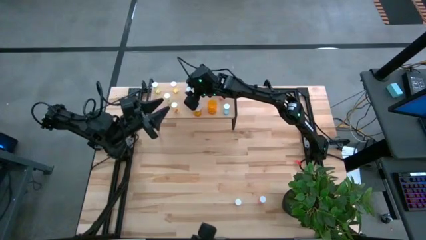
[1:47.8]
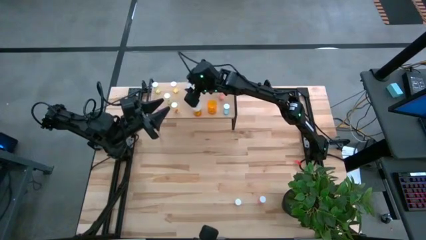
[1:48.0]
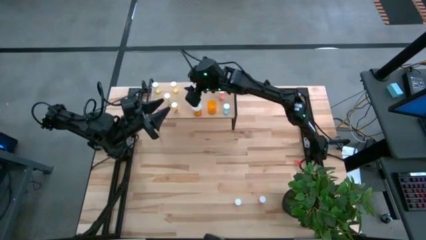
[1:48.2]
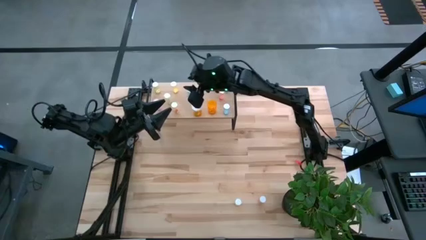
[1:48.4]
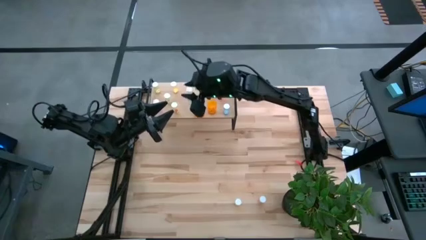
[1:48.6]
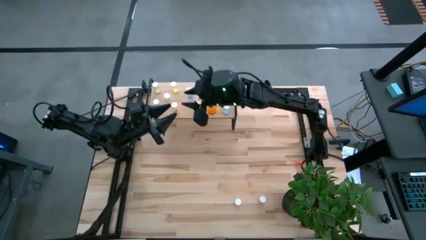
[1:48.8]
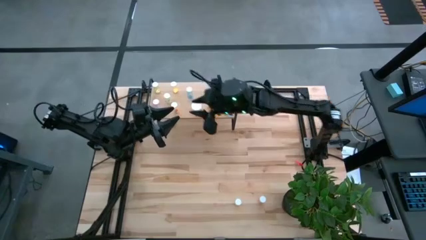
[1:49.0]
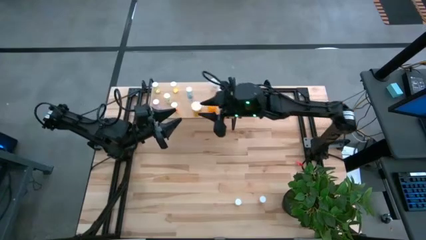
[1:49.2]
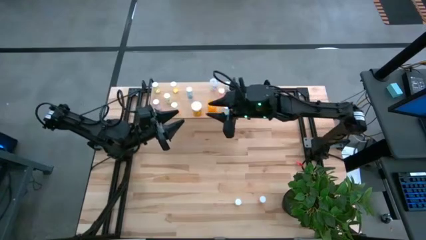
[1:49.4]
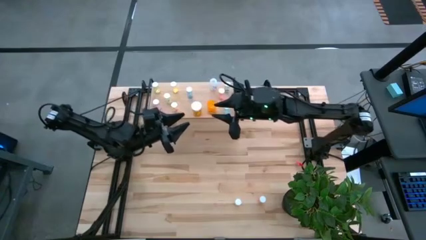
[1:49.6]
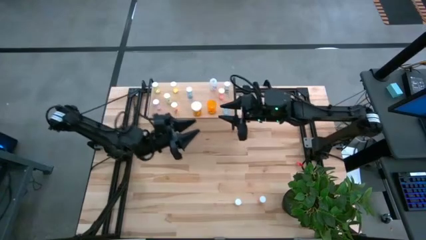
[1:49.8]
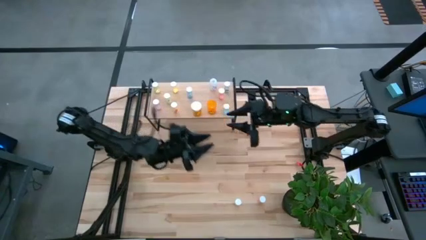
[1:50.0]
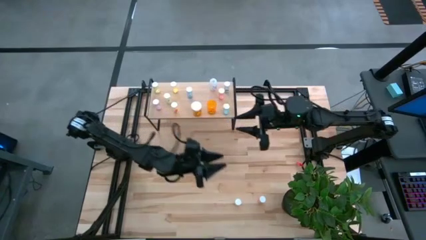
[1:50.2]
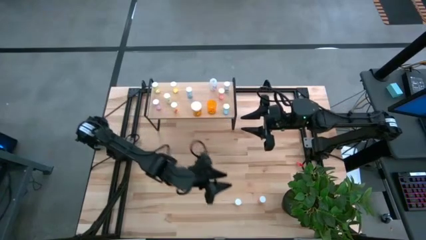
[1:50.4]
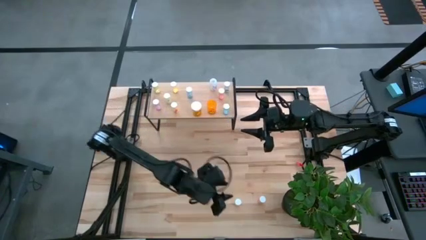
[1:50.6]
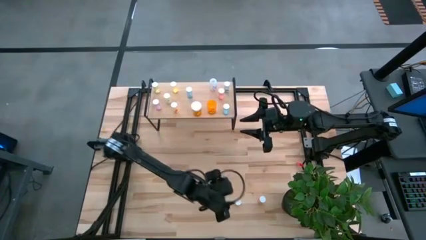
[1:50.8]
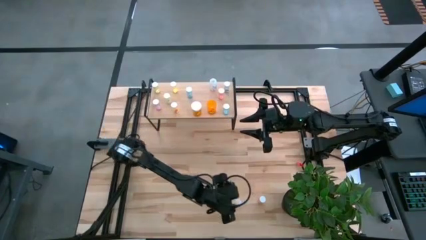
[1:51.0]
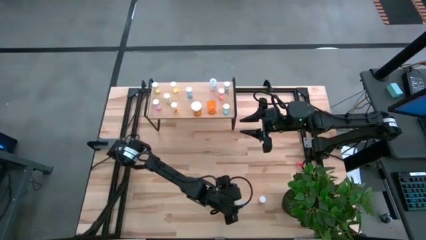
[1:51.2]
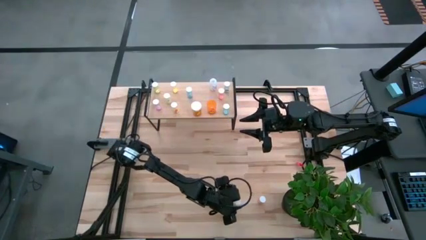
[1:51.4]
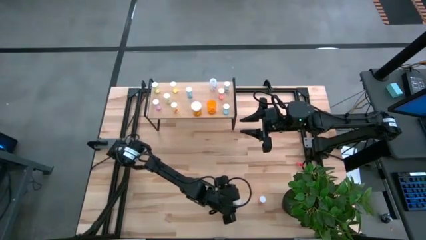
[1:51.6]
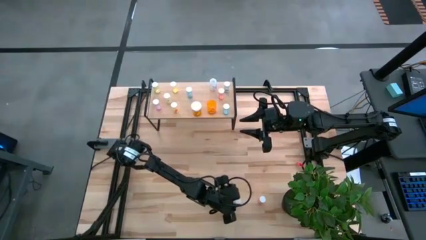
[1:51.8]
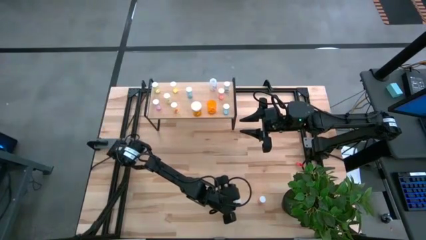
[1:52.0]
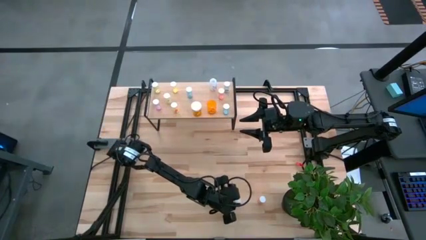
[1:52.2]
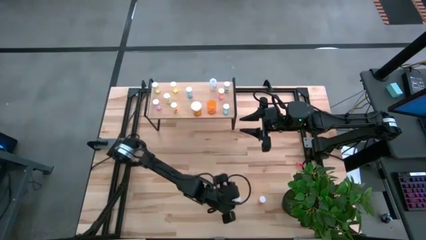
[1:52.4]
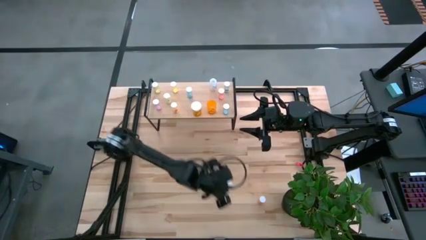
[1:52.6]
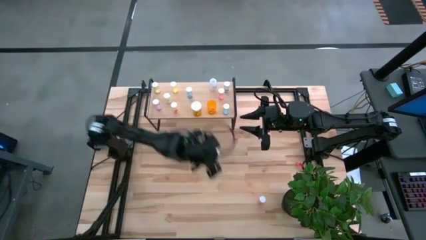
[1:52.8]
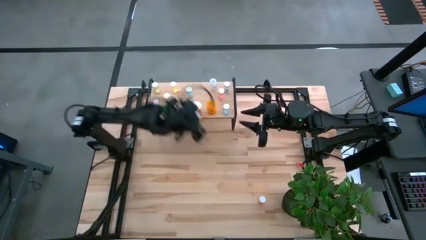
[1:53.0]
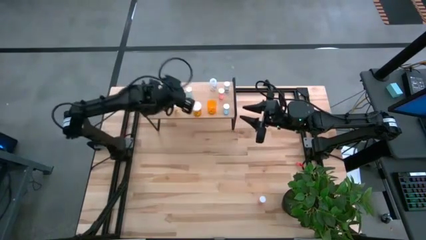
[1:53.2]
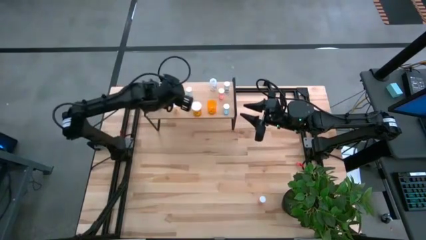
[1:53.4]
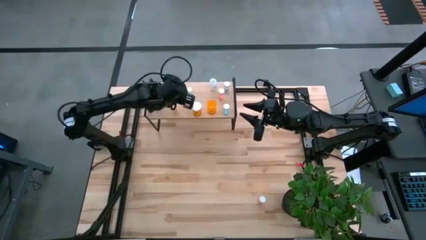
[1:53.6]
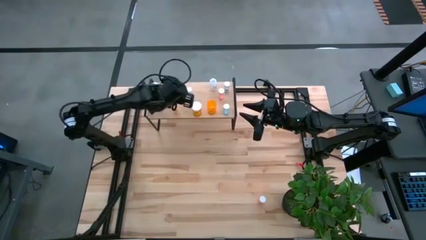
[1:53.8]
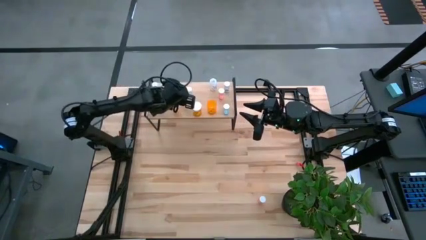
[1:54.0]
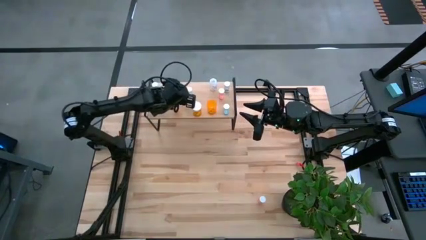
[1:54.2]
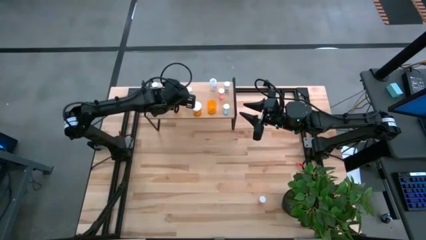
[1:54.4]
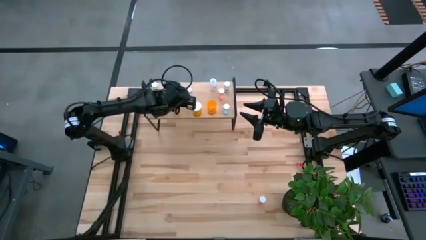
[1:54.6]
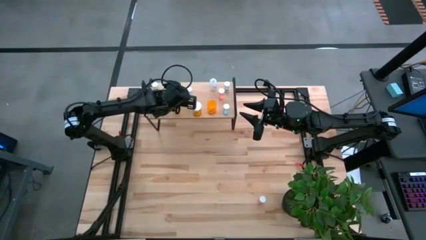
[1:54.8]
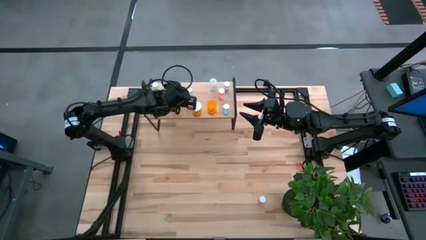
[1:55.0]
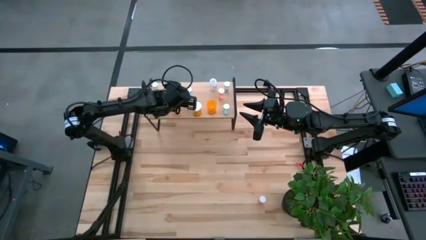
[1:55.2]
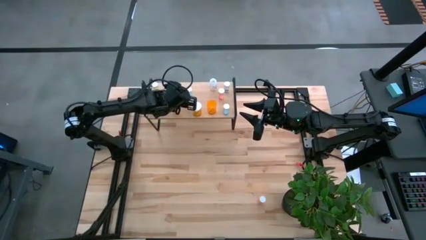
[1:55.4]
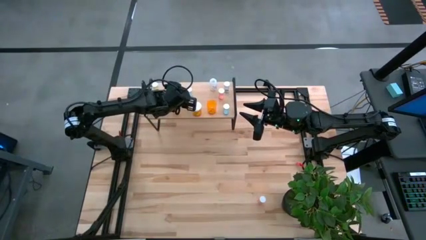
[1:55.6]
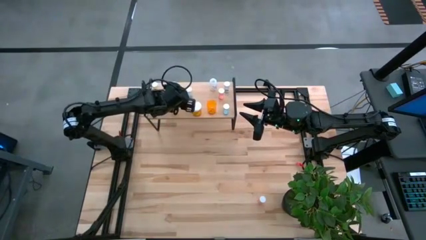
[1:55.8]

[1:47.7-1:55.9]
Task: Pick and place medicine bottles onto shelf by color
Put the yellow pill bottle on the shelf

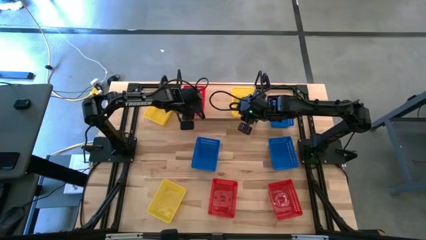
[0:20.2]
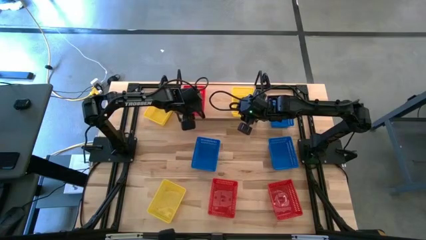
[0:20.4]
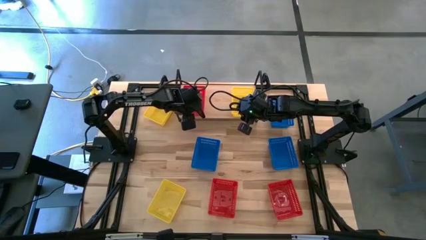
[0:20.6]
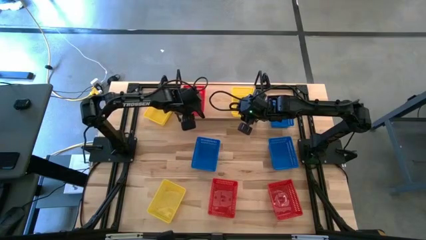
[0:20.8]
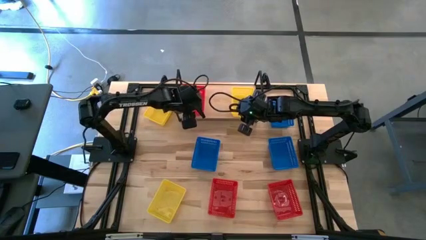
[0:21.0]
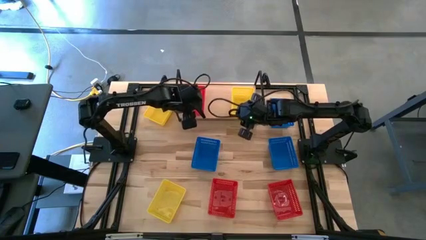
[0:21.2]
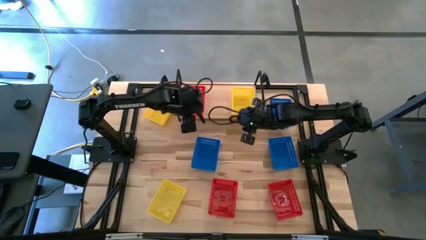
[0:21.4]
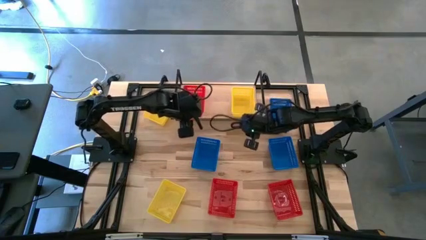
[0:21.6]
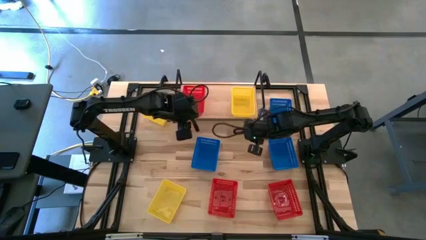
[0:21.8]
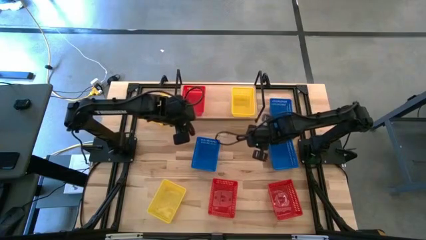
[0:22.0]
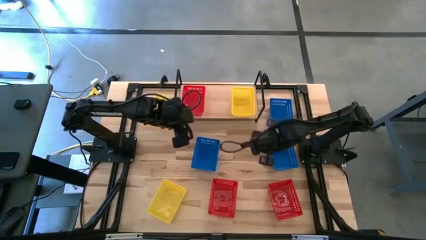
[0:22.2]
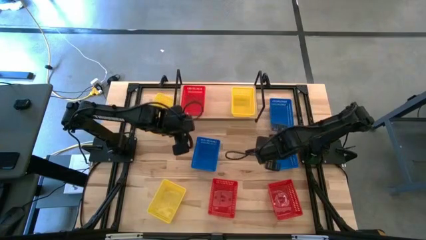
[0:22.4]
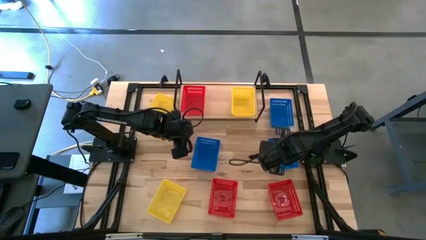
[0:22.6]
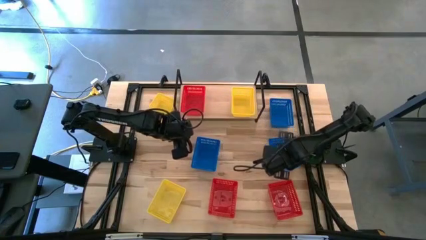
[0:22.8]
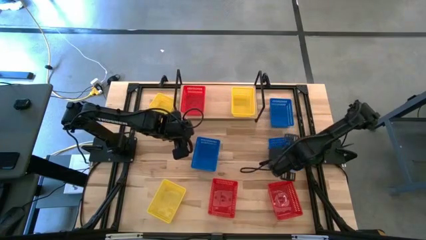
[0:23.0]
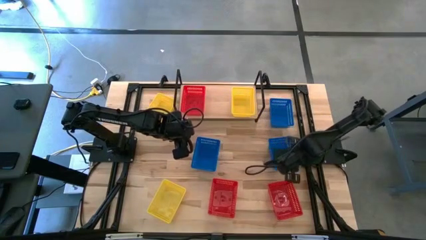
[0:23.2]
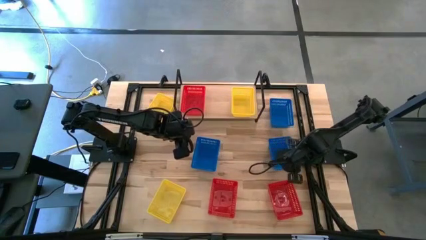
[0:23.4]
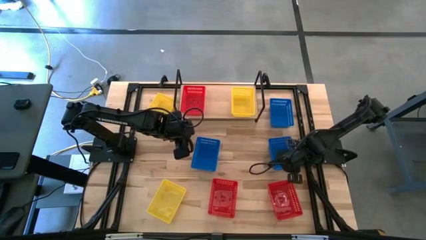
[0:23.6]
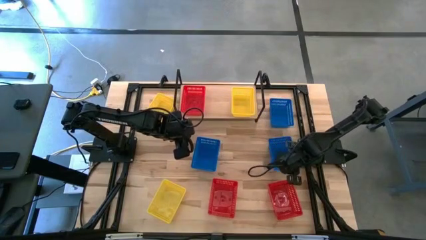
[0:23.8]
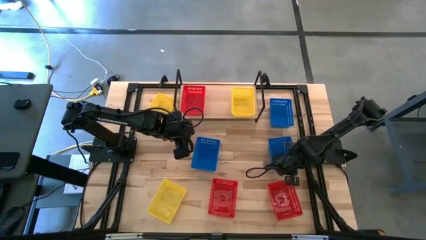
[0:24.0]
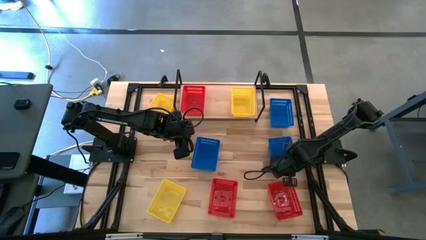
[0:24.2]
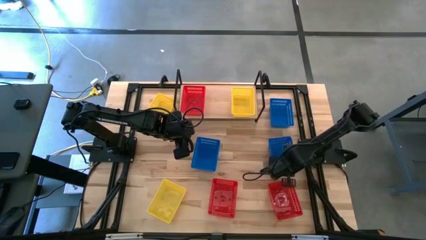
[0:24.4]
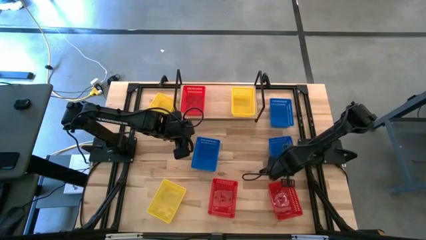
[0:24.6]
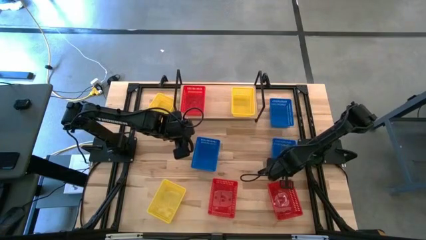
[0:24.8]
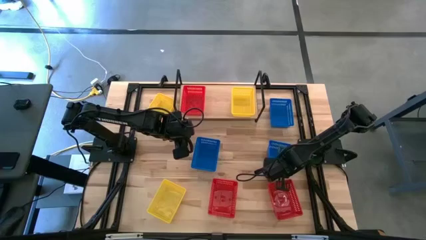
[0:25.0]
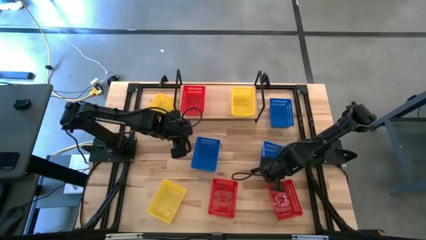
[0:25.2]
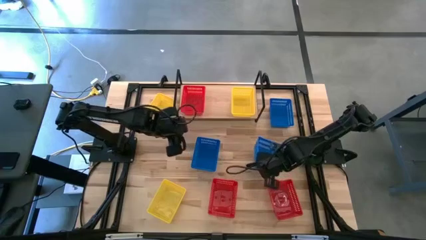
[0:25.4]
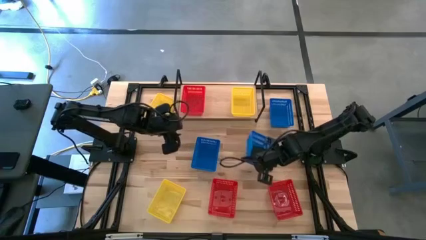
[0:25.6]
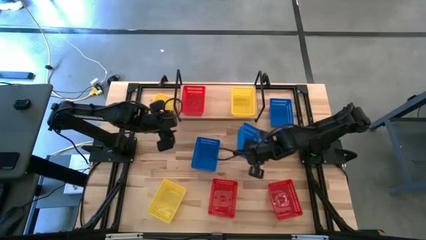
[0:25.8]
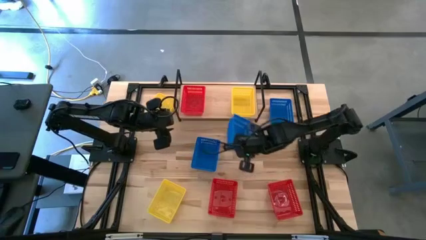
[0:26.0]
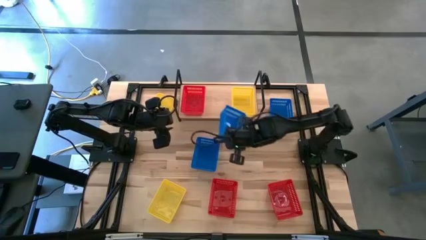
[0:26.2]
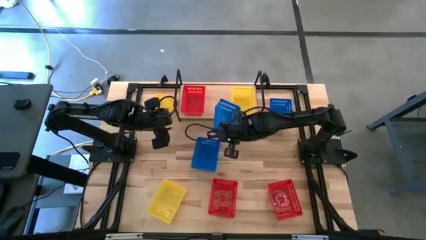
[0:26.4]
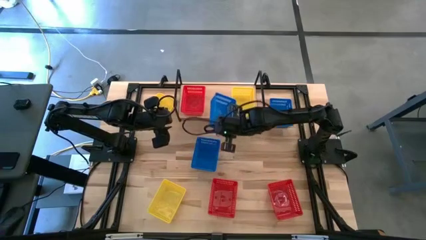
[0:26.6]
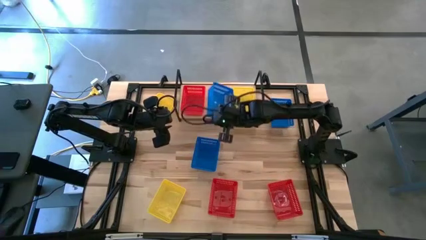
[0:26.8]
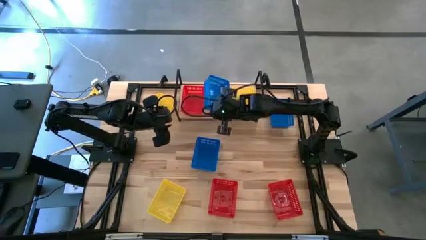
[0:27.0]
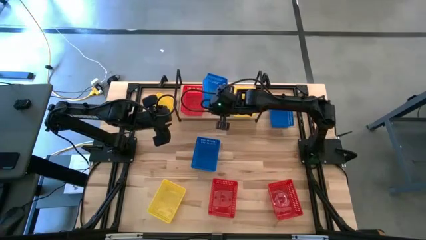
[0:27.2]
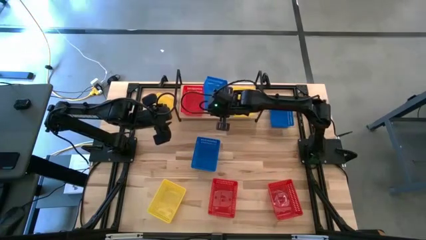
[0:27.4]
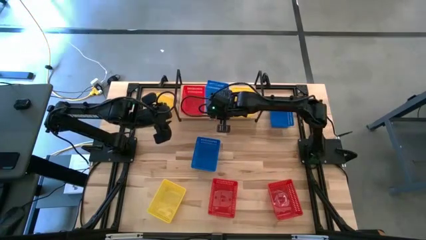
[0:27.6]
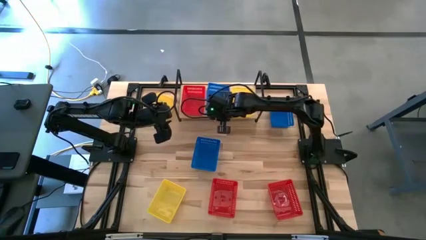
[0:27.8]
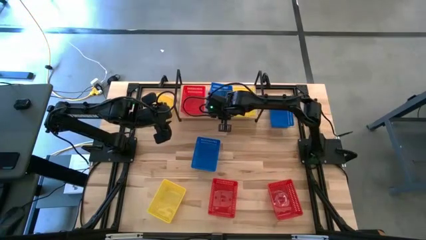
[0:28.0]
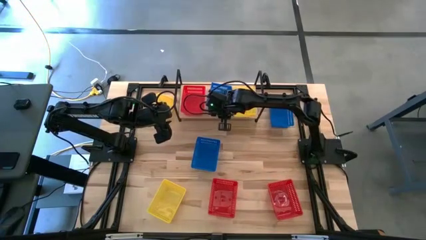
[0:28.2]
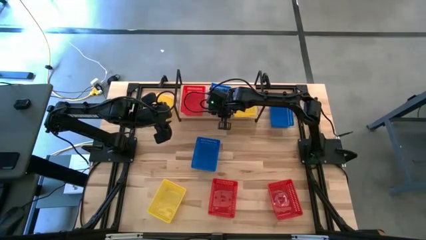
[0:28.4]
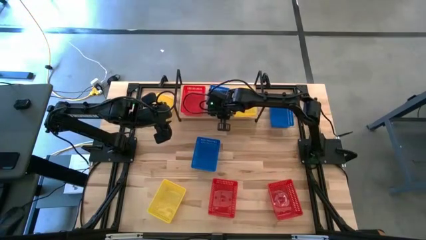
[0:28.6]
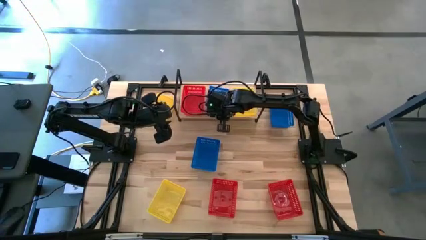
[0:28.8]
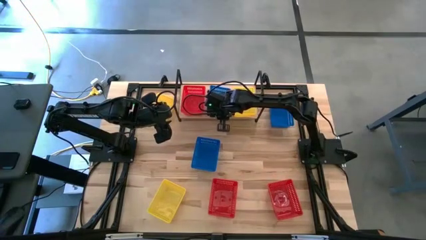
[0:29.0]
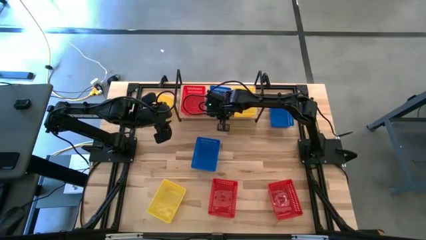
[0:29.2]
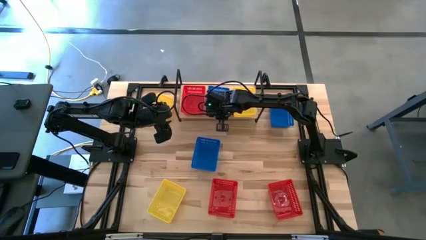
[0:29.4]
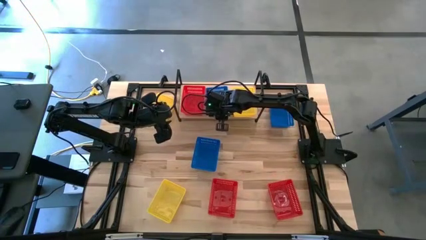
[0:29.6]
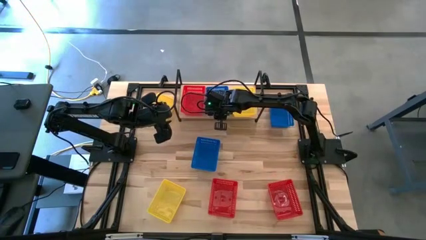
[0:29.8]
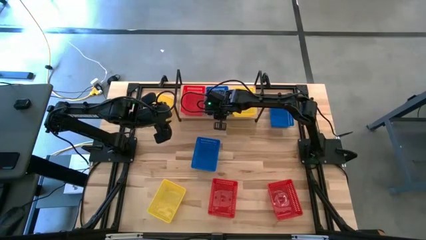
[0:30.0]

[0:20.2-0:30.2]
Task: Stack baskets on shelf by color
Put the bottom right blue bin on the shelf
